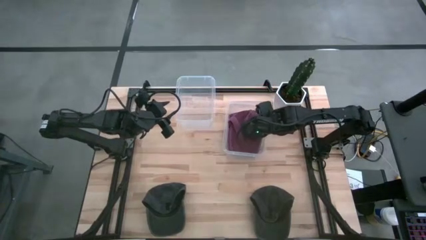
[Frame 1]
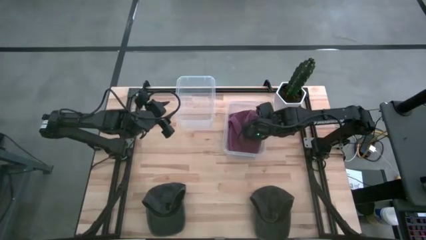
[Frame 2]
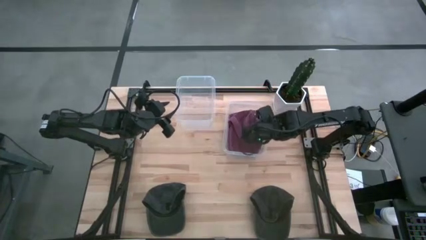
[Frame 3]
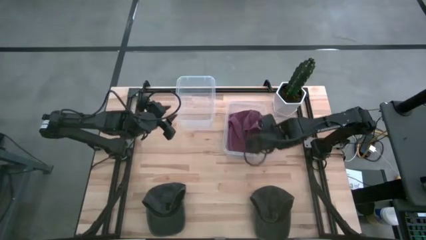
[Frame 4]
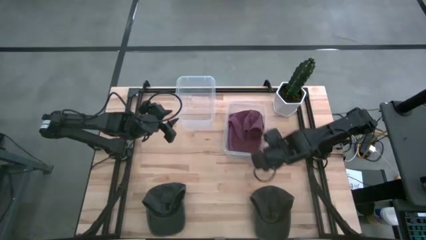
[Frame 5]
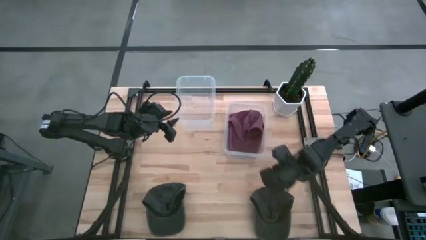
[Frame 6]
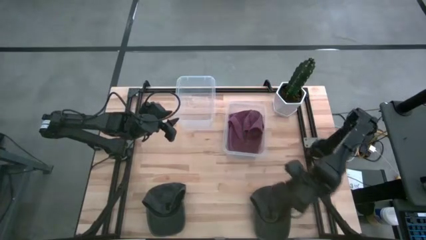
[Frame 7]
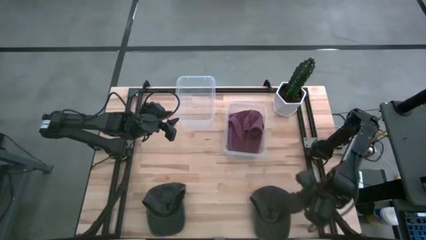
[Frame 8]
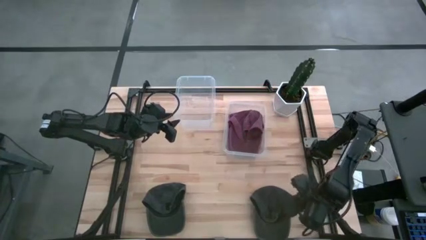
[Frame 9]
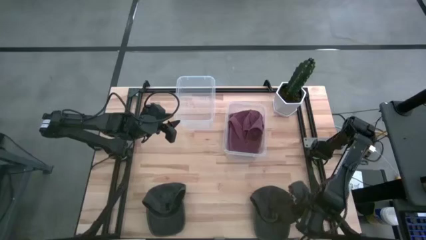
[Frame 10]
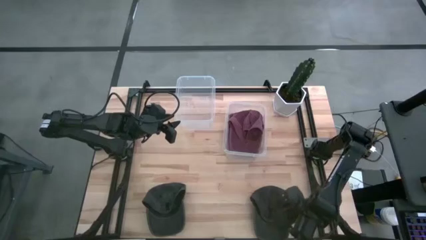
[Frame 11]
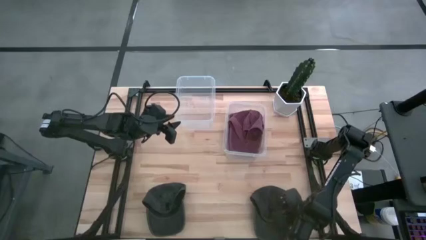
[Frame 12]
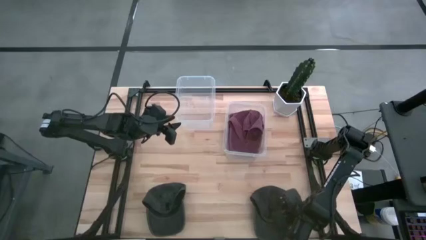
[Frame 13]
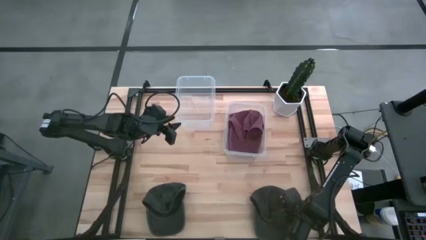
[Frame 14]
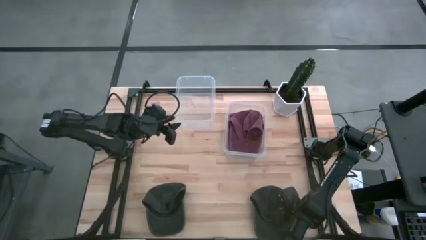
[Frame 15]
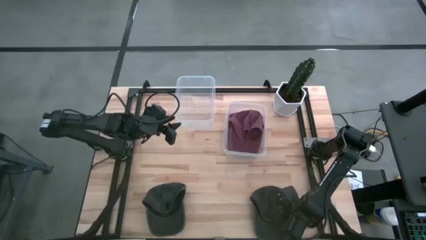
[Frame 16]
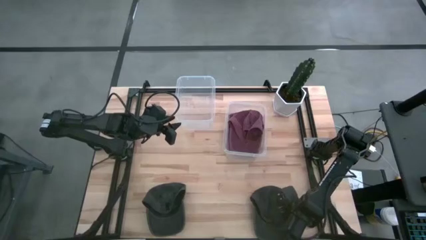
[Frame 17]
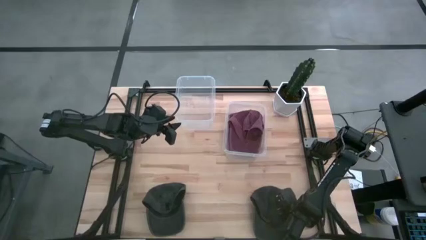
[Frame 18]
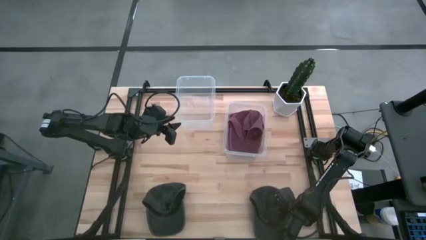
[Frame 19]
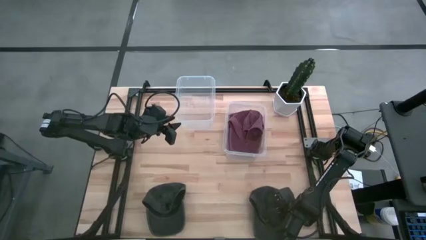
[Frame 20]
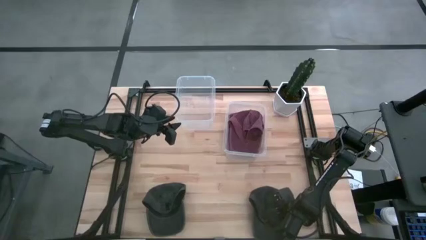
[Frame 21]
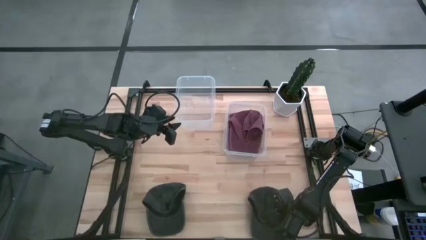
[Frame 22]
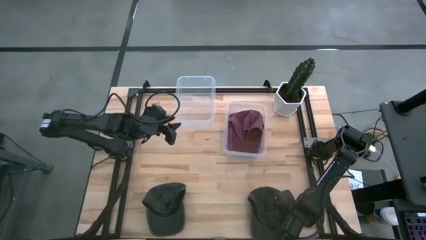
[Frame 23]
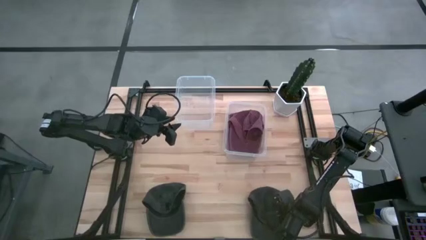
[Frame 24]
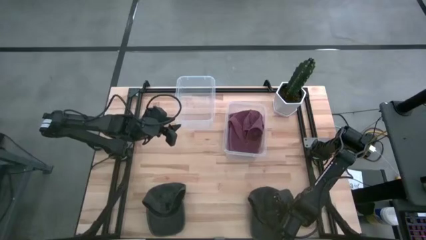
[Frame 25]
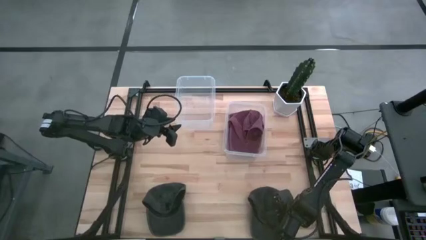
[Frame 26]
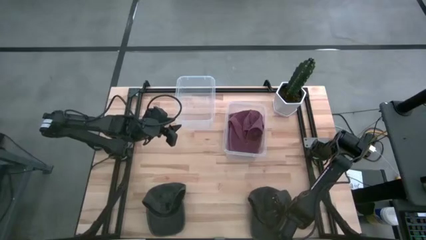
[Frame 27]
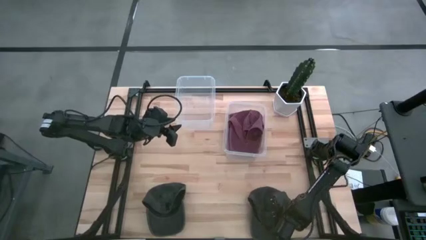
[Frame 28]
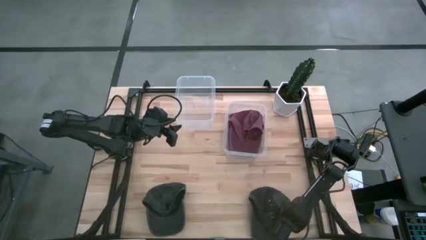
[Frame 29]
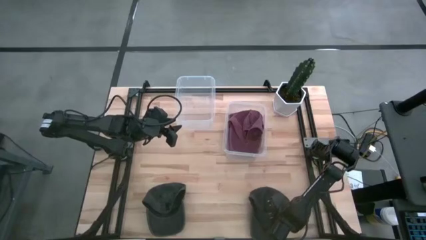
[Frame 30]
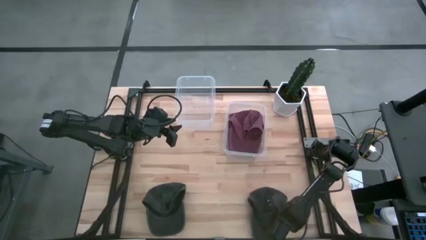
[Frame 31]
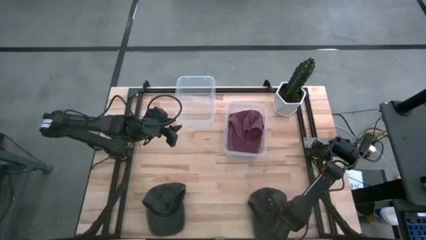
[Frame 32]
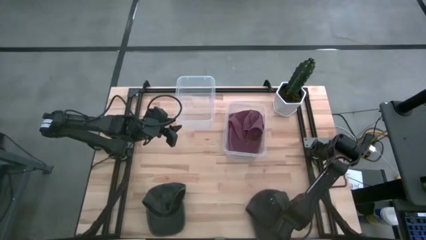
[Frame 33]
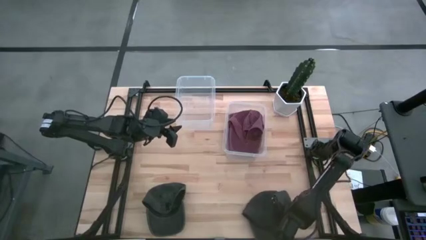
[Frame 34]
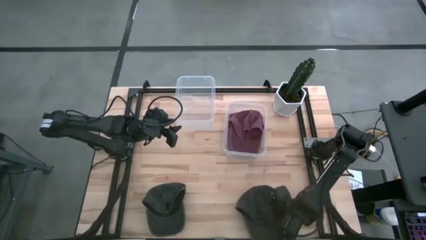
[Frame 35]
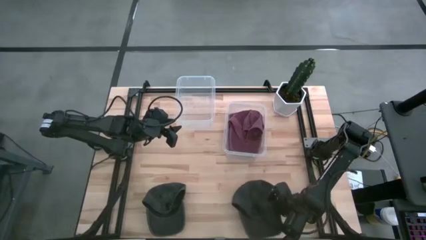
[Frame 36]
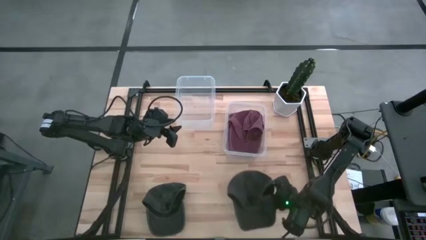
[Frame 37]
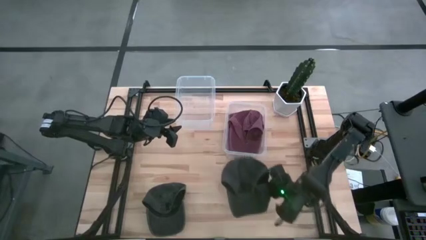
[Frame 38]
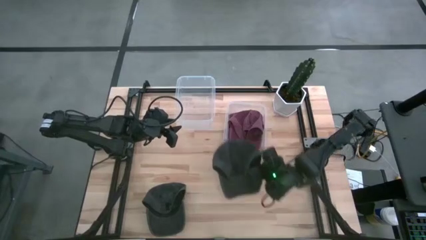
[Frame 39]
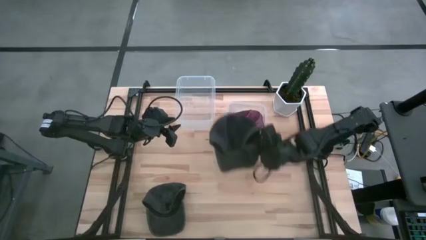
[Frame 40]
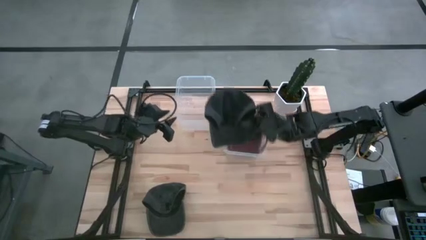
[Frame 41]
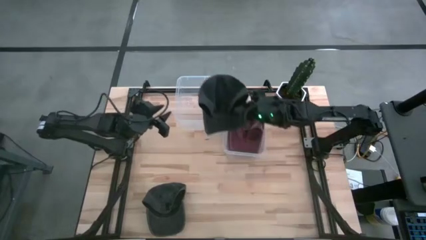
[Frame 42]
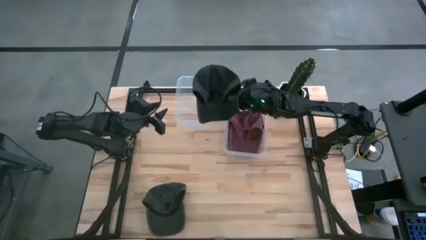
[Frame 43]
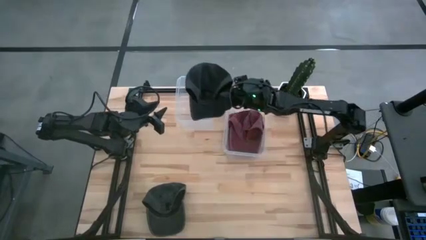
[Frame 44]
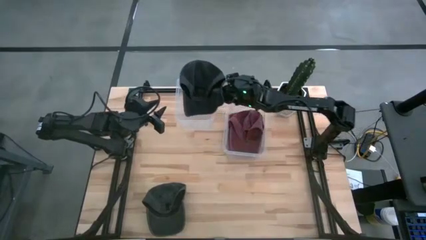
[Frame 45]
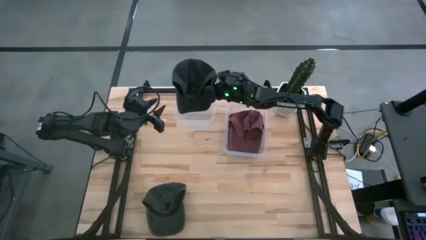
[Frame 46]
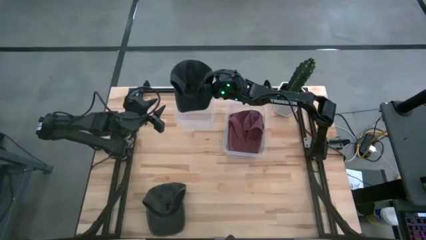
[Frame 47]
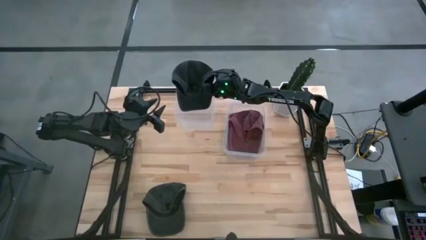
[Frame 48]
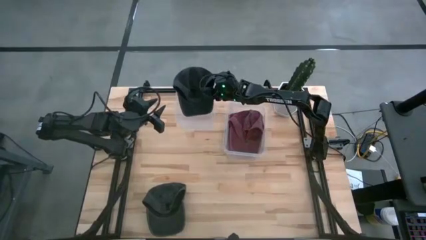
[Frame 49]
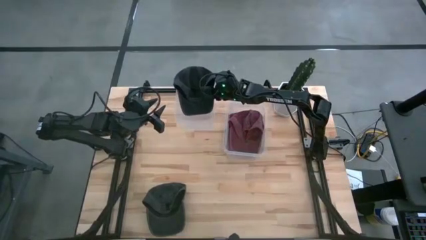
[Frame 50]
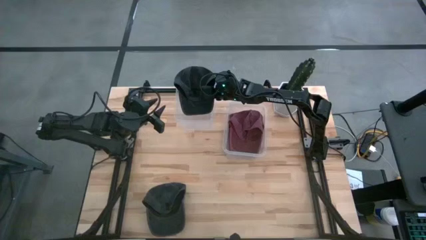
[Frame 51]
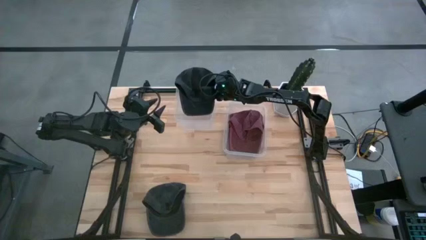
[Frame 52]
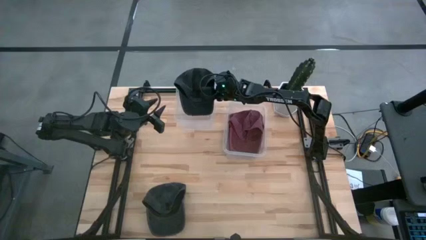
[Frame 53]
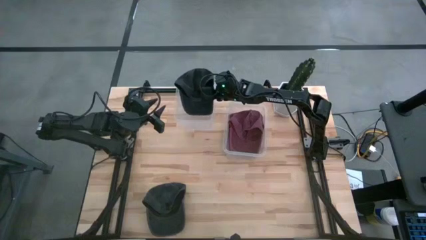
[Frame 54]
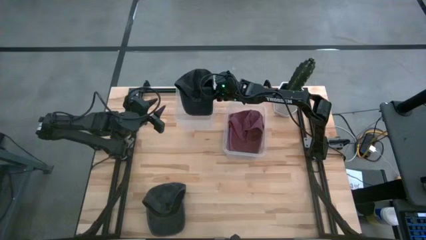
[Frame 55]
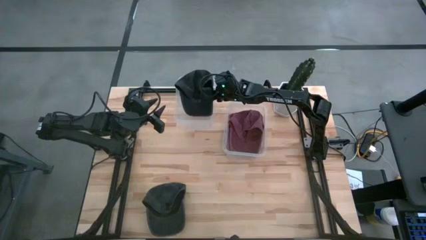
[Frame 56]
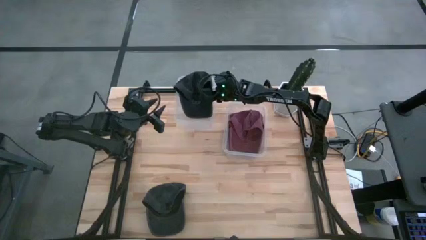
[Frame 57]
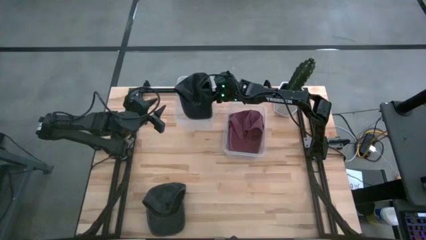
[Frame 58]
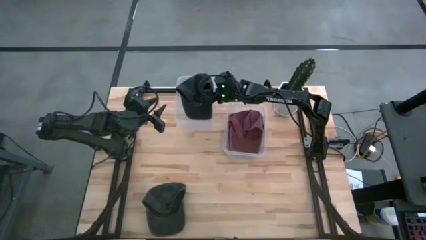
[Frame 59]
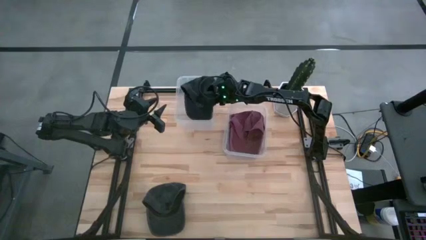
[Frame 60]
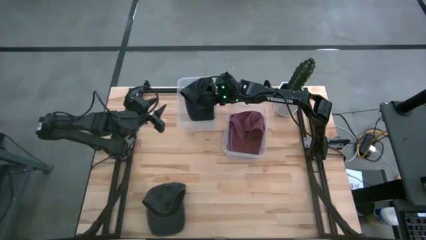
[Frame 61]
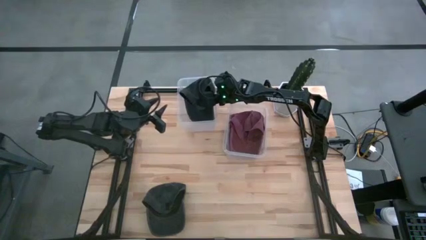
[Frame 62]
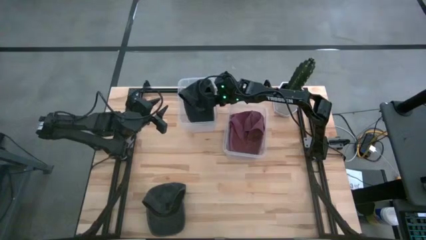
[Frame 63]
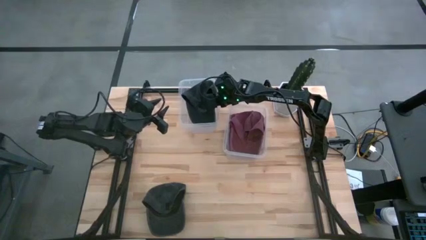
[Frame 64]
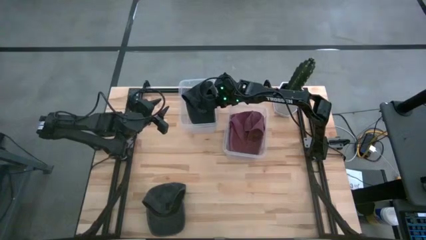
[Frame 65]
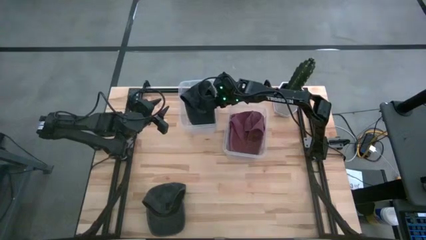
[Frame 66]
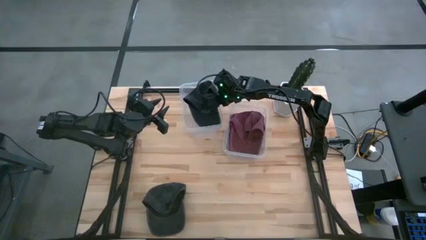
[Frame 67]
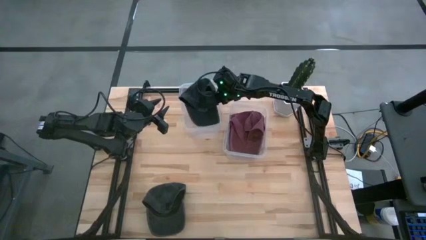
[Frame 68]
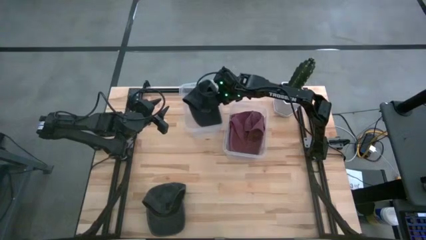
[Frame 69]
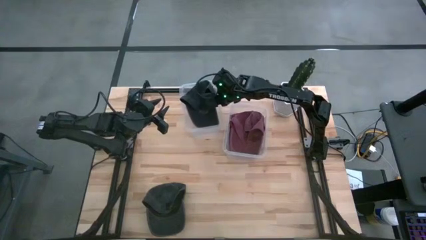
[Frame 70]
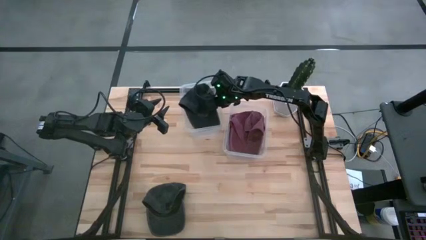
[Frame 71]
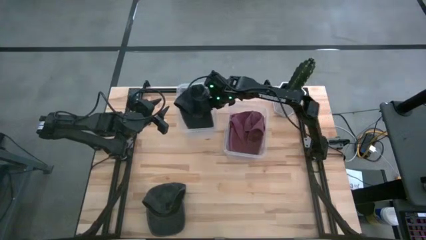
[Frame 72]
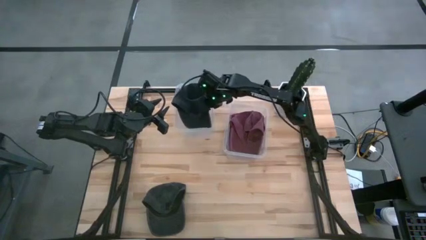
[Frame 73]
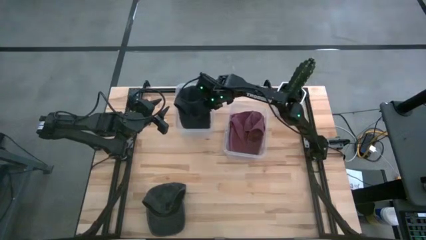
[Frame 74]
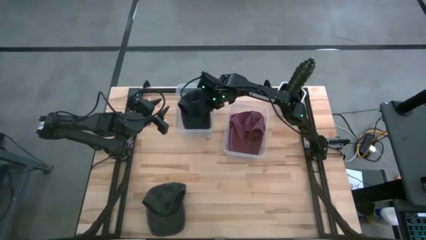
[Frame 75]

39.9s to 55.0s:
Task: Pick & Place hat
Put the right black cap into the left transparent bin
